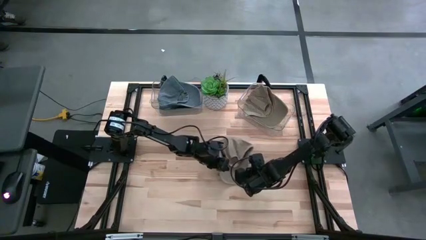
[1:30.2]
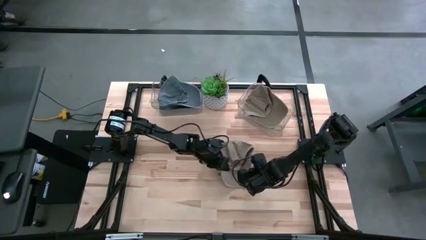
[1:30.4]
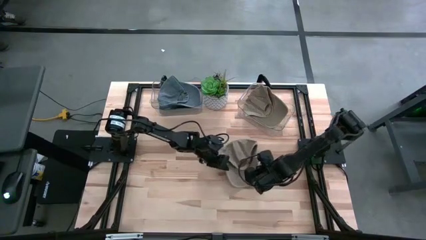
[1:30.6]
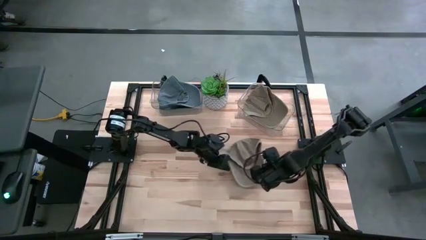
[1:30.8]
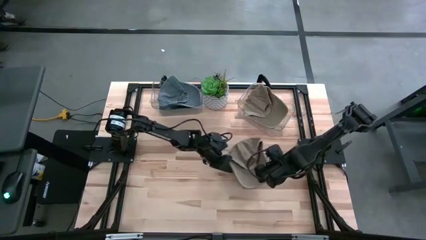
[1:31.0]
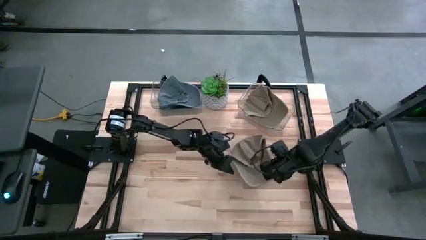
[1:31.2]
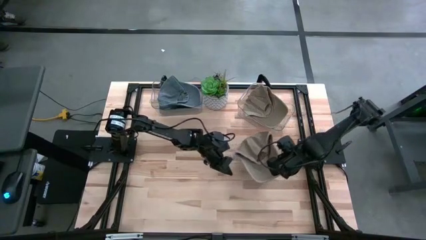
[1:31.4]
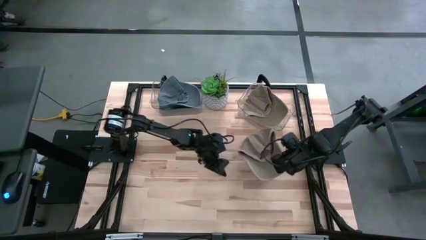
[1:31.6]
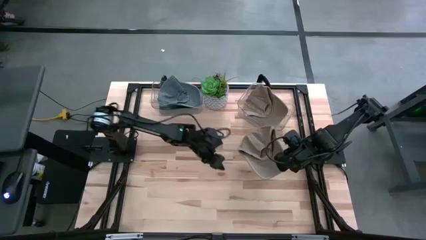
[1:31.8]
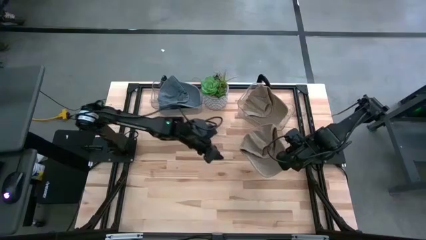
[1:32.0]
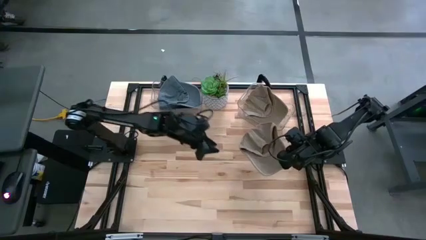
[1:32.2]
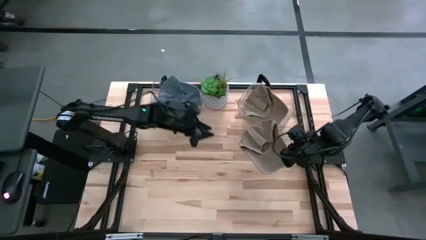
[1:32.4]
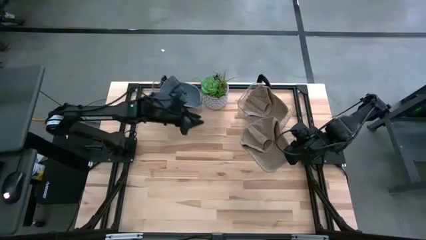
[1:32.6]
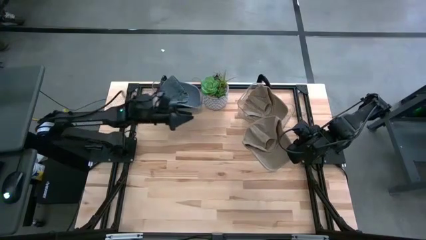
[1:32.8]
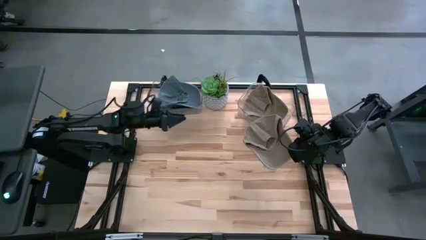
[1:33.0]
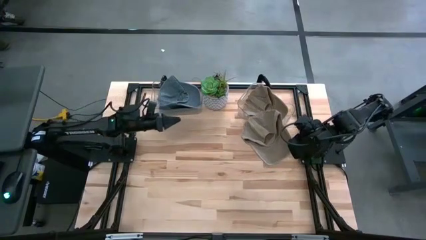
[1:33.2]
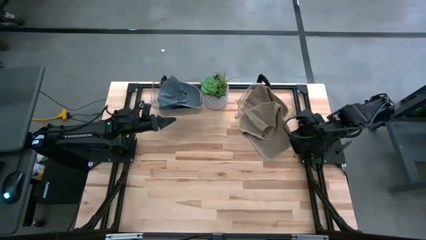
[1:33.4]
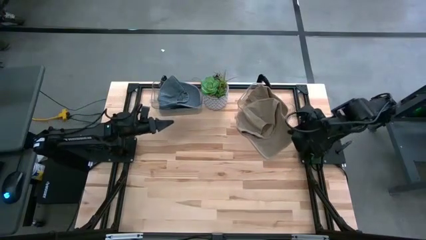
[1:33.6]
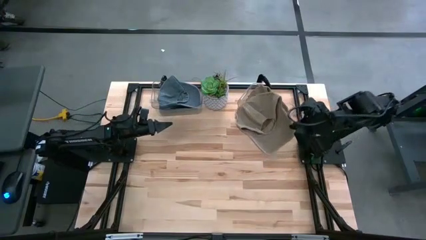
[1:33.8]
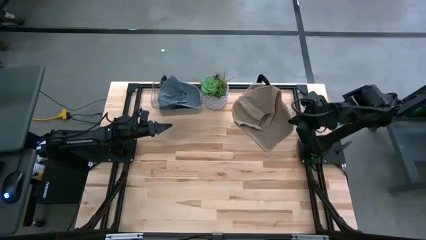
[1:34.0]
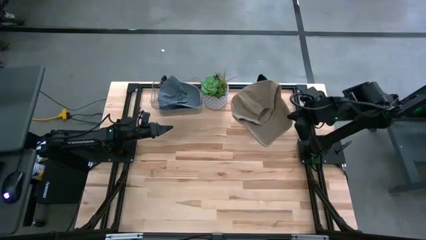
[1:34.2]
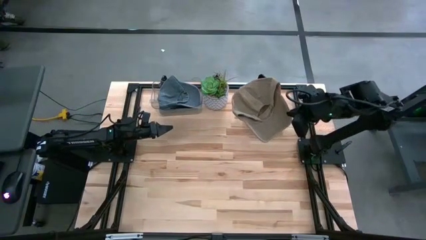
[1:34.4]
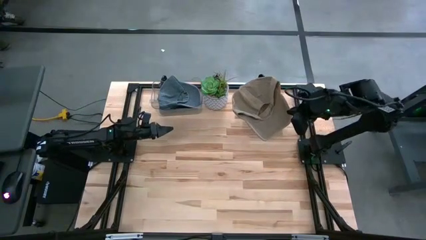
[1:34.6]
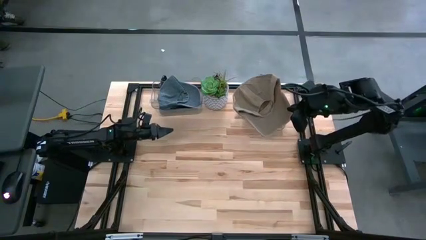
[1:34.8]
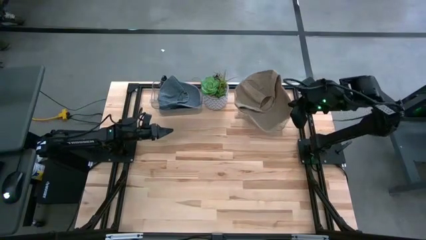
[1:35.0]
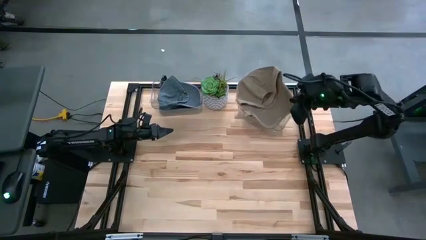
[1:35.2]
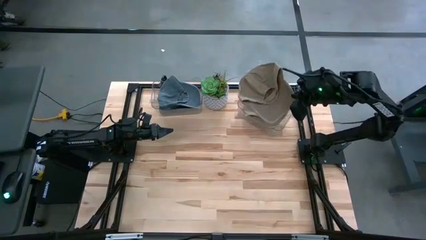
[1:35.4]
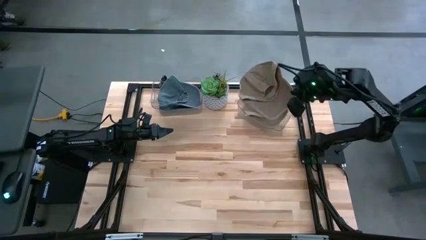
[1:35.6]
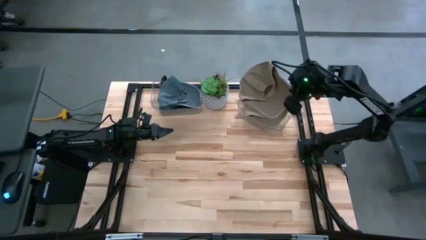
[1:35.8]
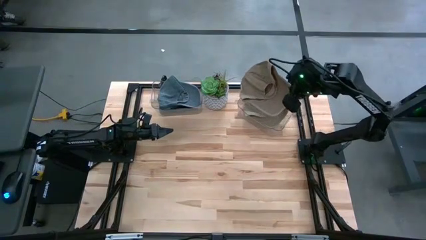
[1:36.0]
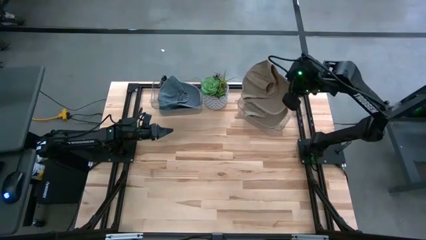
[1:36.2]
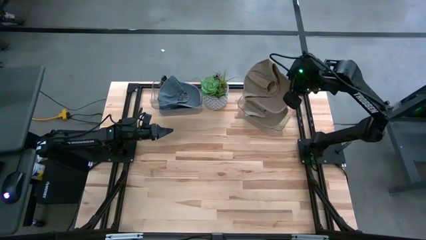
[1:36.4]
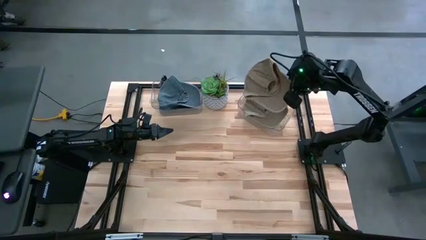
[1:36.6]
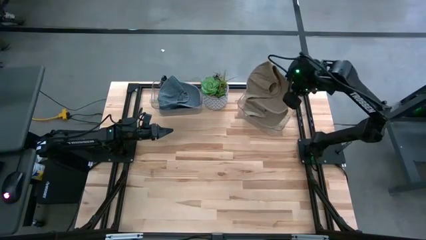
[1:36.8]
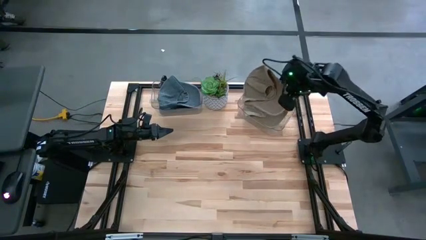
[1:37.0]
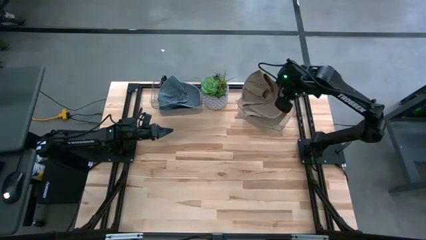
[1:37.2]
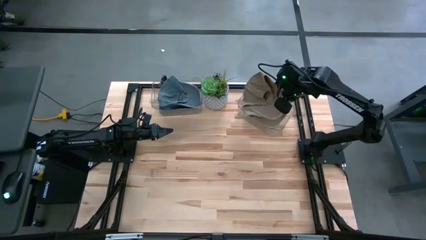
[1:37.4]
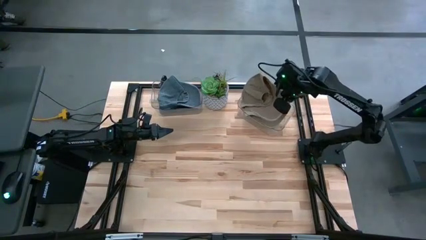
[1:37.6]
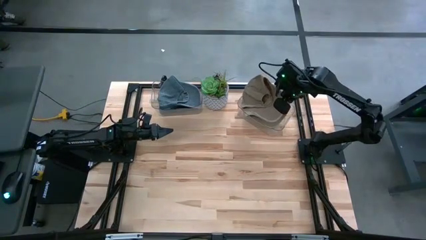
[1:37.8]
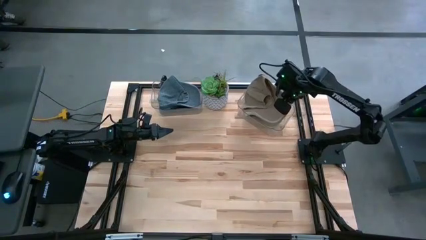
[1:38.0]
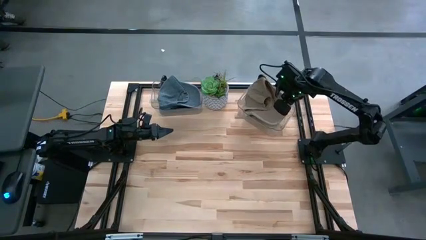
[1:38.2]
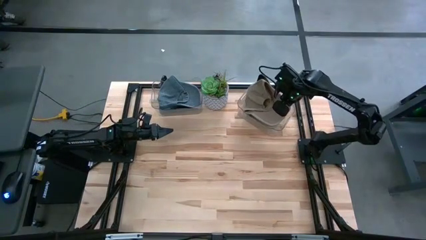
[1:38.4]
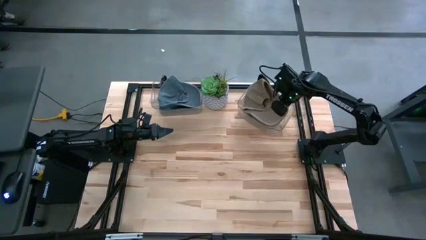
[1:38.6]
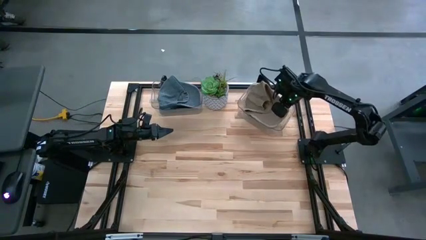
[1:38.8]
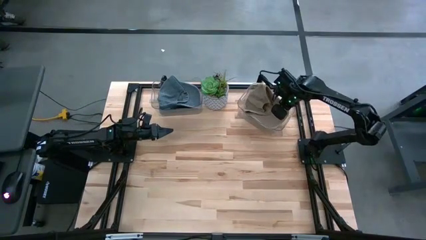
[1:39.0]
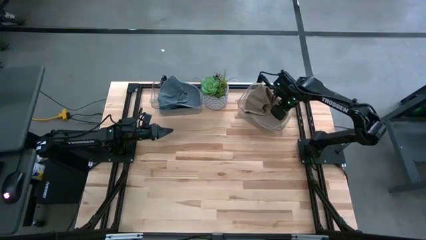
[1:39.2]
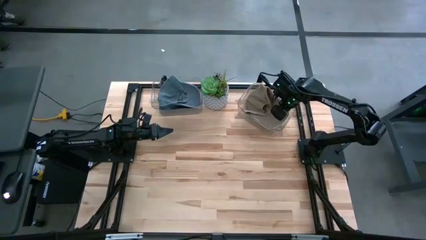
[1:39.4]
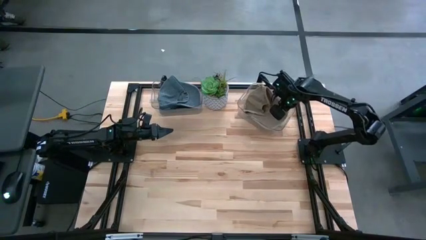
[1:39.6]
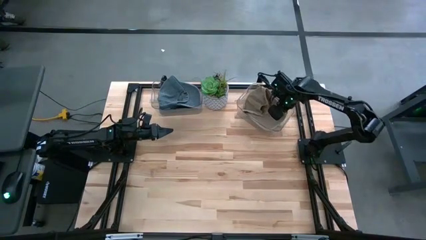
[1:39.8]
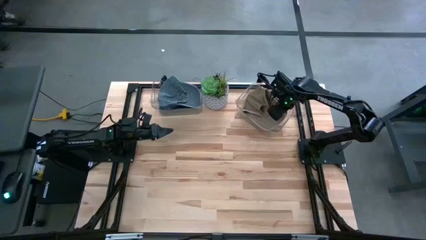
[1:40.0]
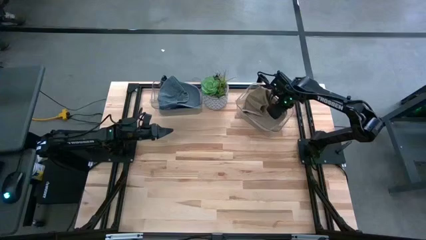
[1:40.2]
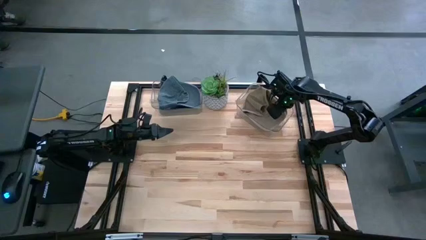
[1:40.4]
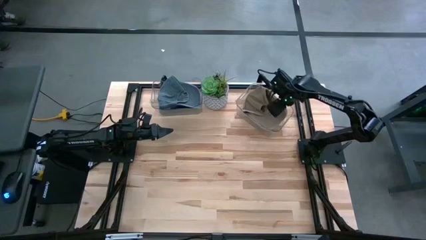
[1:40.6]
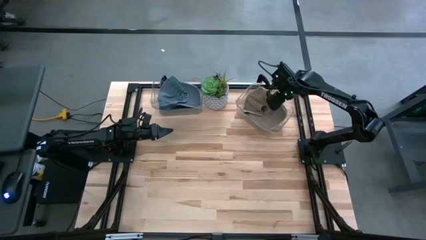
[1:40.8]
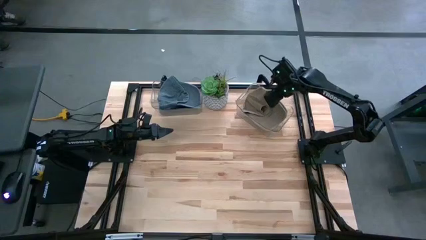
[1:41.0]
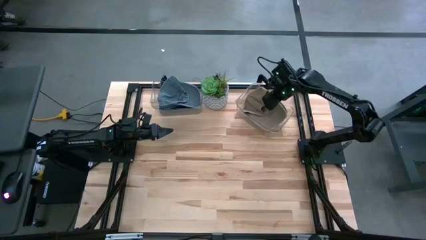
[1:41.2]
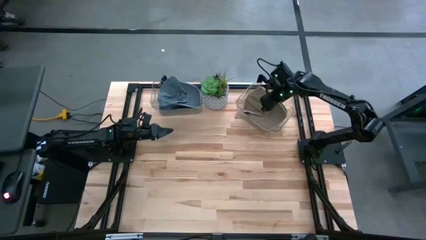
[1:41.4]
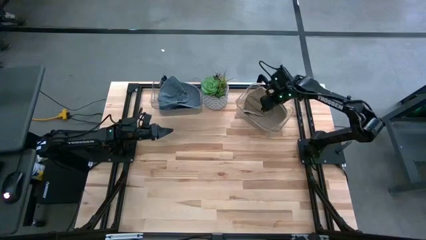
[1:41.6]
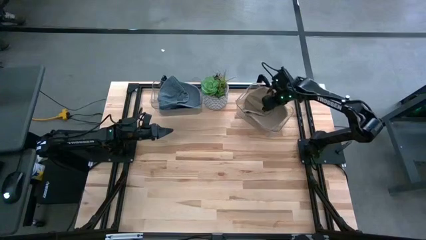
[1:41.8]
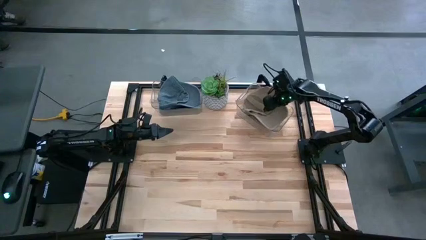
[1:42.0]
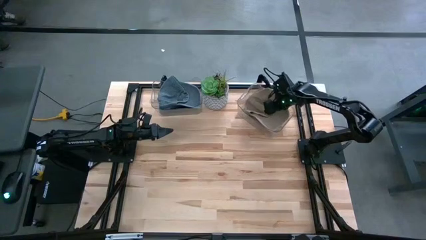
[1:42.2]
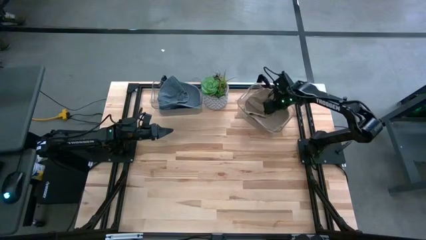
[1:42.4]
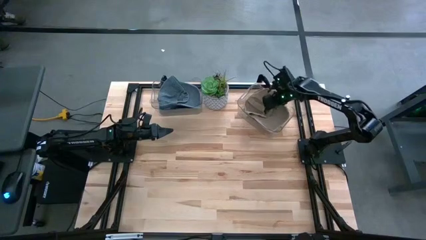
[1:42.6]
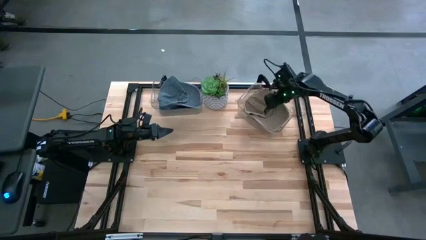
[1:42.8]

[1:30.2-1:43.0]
Task: Pick & Place hat
Put the light brown cap into the right transparent bin

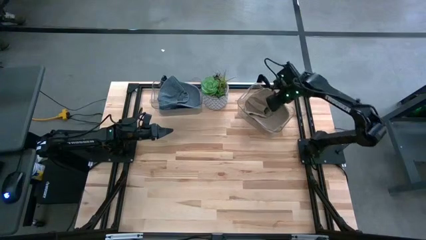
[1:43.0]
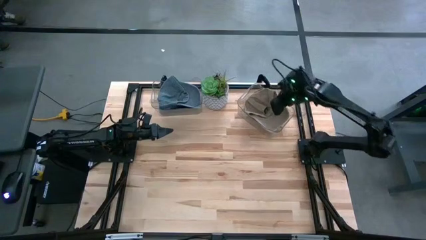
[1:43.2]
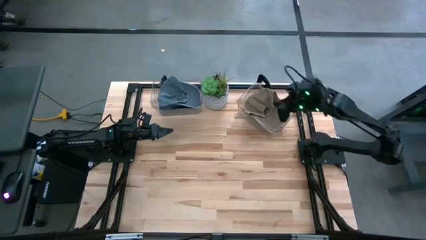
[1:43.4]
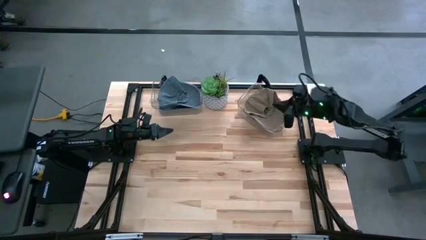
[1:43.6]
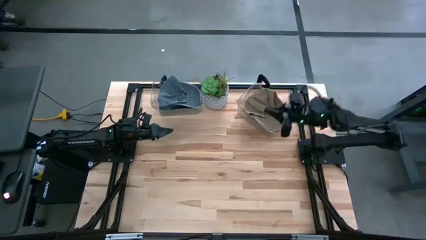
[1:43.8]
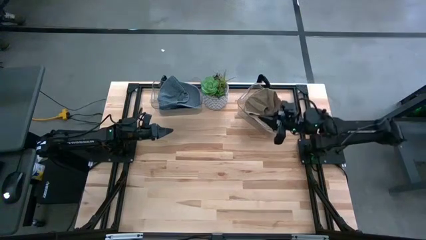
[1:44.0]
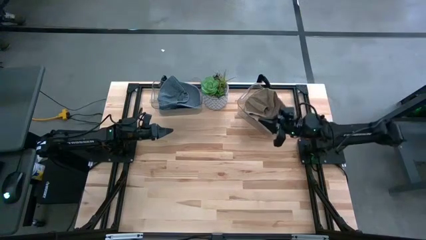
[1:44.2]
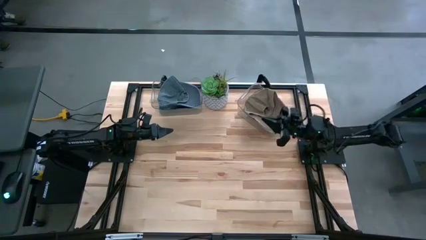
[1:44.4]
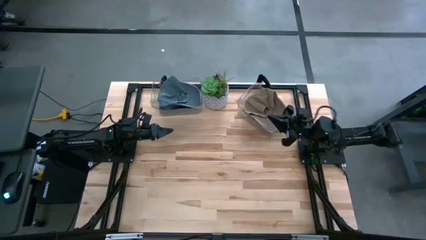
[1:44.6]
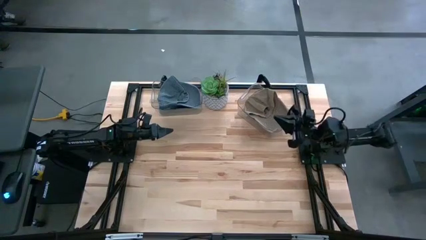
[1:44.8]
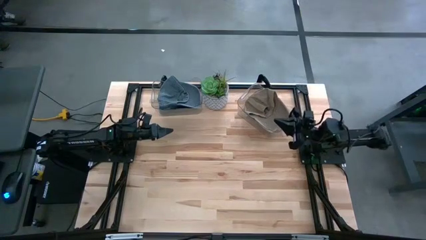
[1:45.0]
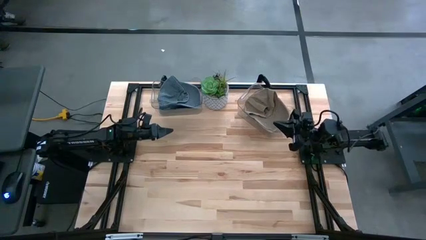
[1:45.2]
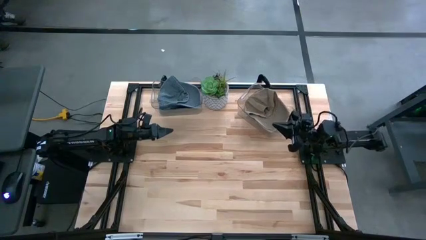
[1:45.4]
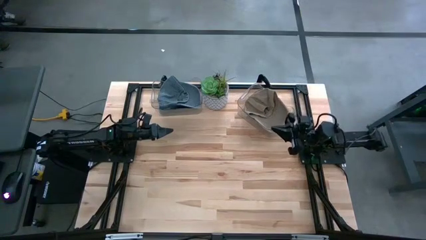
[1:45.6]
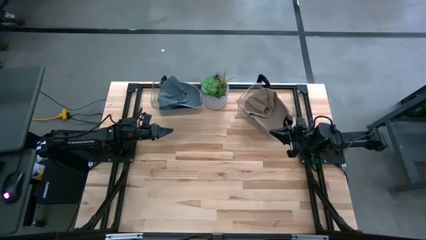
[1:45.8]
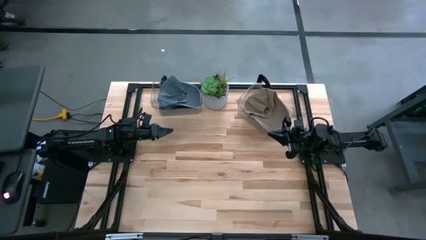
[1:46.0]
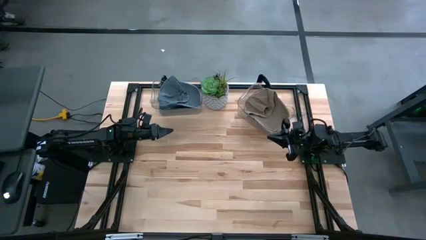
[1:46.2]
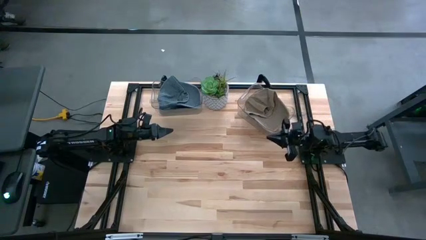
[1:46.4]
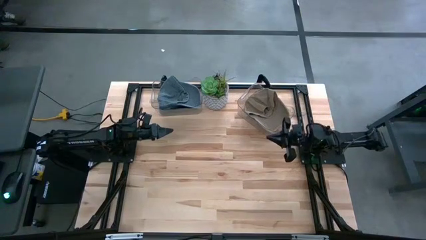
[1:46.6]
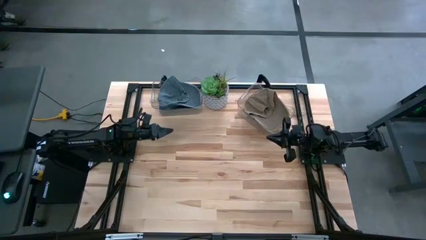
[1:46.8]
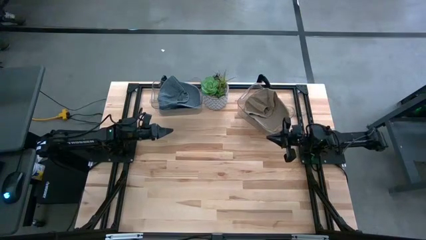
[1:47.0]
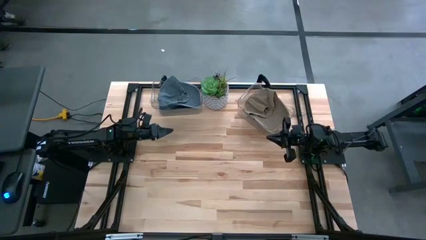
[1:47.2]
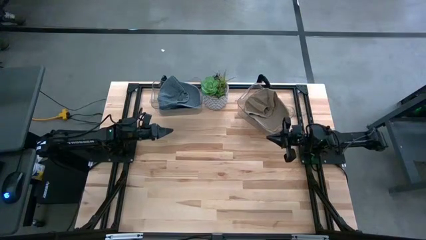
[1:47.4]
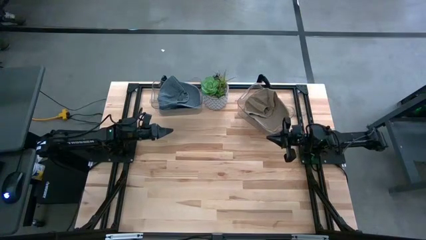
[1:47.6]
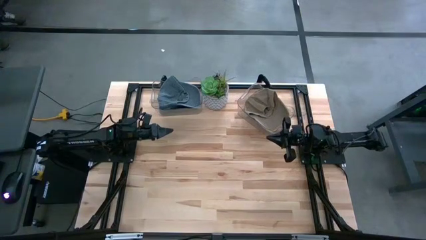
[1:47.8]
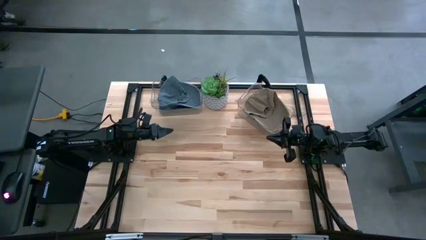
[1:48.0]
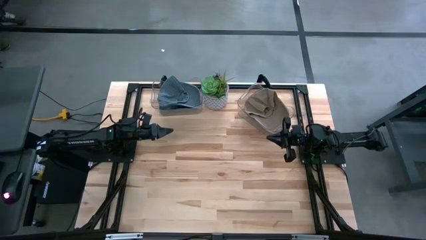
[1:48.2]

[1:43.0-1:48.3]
Return to Home Position
